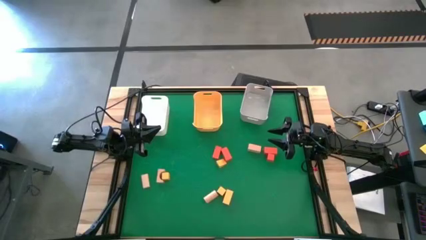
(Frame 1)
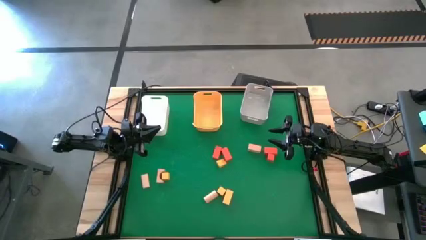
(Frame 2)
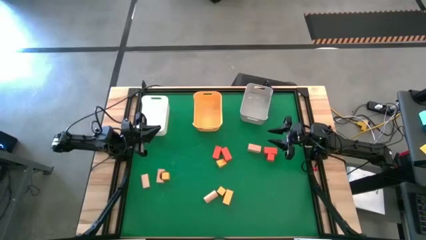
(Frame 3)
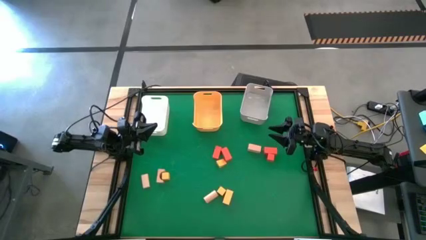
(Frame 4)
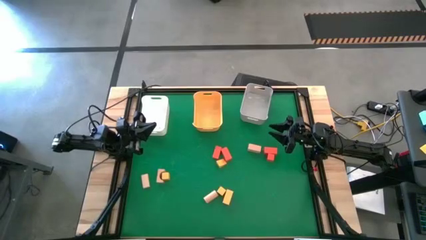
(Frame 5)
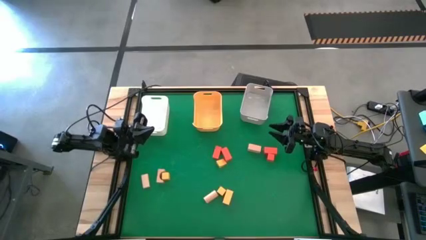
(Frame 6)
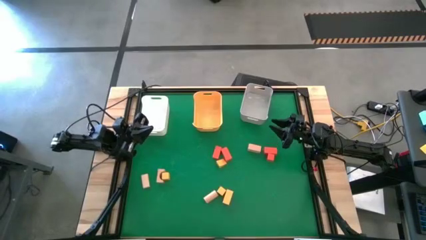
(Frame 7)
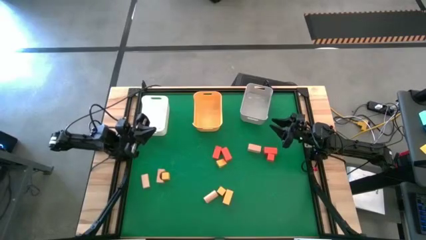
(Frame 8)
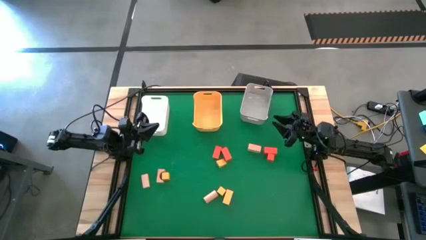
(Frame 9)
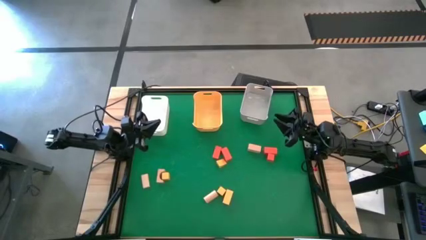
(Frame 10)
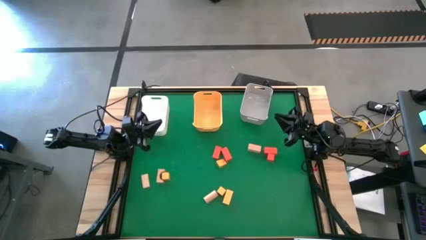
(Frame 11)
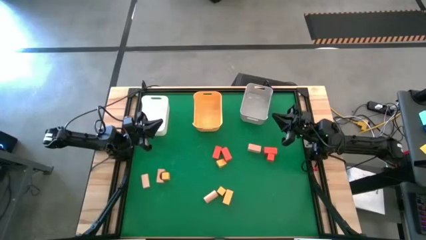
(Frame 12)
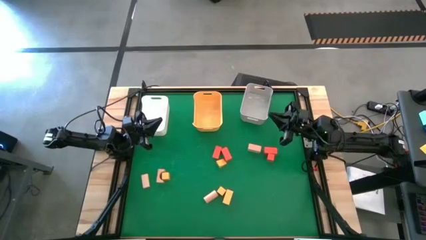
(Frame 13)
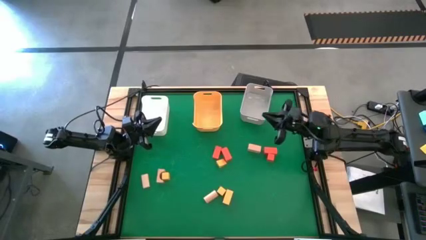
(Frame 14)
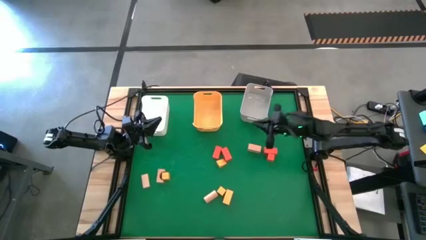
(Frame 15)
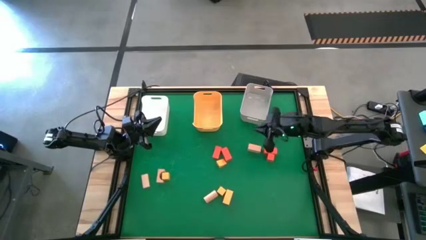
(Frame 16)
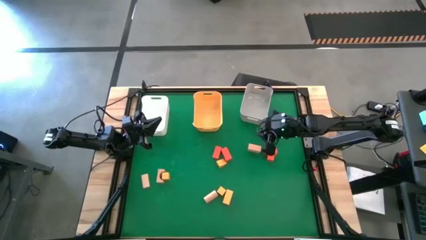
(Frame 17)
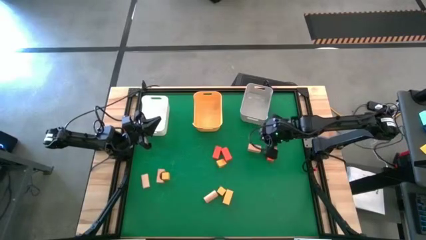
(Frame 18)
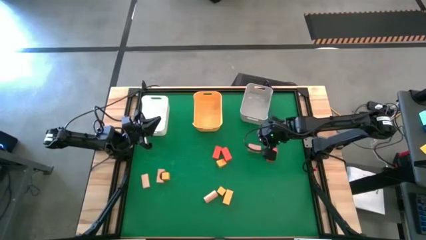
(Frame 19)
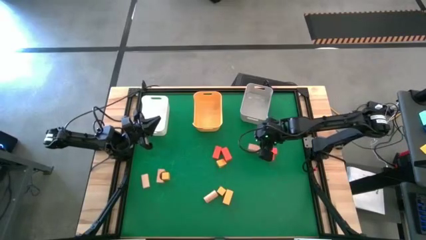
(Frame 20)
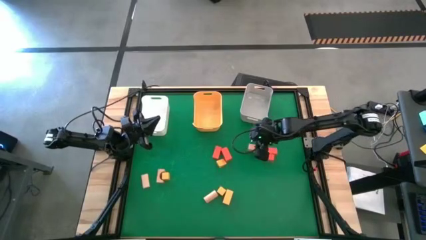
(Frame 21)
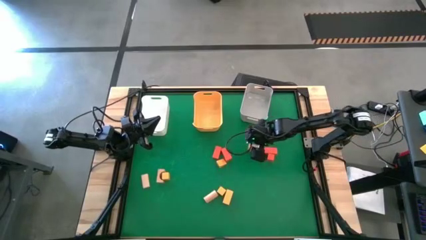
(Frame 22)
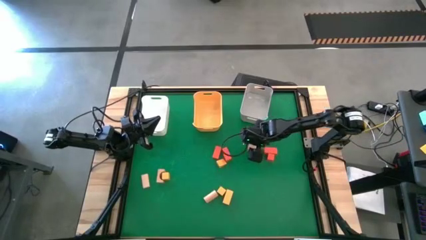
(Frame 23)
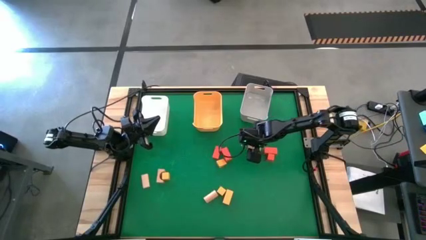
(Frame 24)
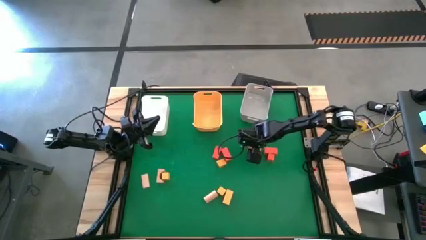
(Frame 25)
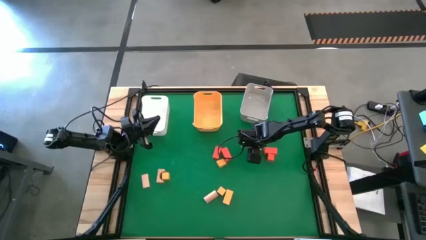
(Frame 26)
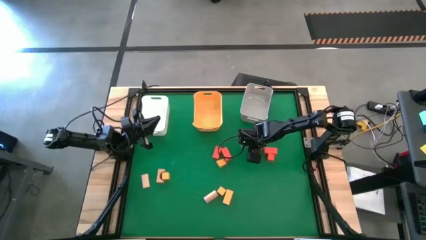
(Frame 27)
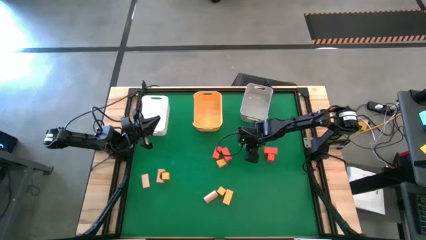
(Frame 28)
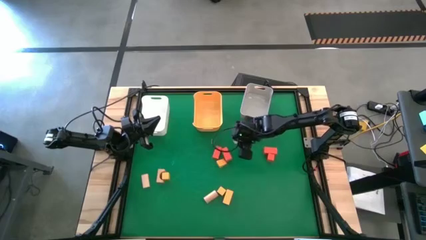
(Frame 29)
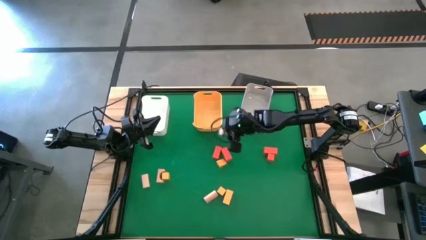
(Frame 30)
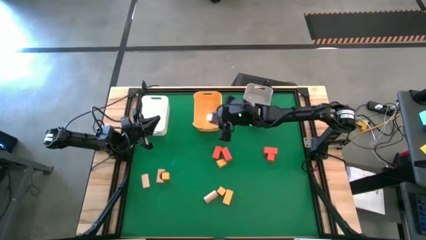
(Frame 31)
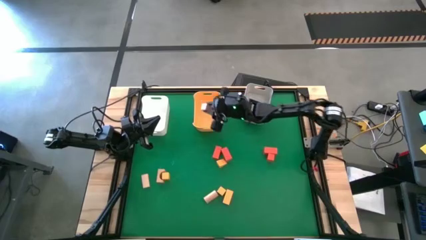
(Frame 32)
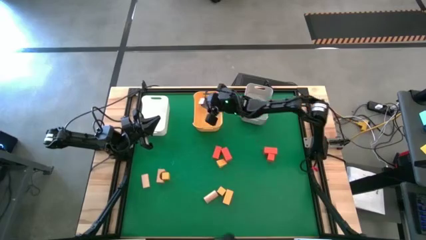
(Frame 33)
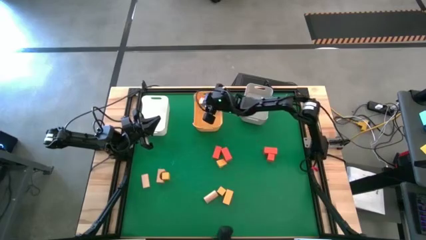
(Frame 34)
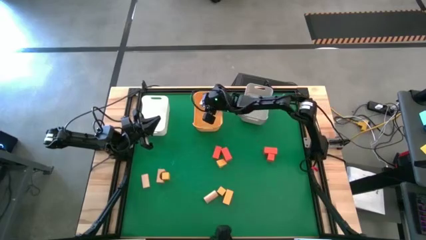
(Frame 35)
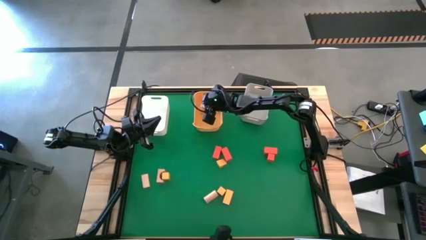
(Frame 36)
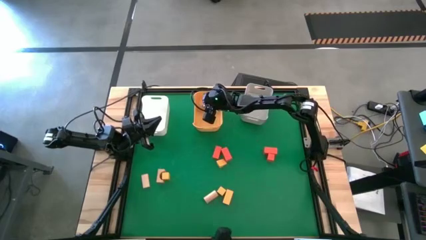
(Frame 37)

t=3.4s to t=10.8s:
Task: Sort & place blocks by color
Put the brown block into the yellow bin

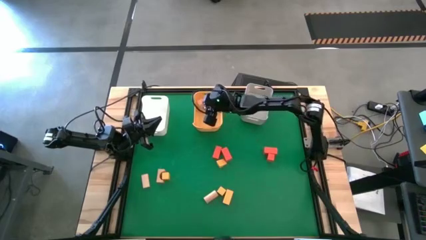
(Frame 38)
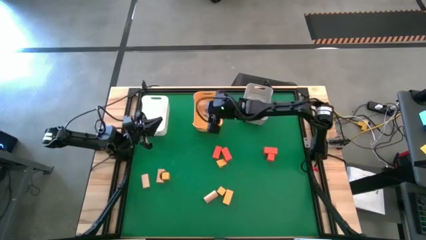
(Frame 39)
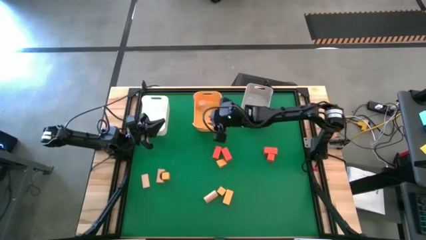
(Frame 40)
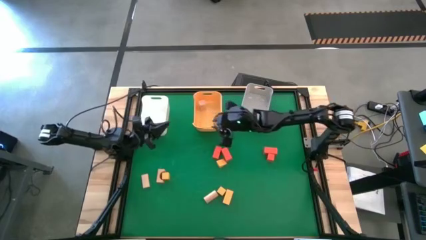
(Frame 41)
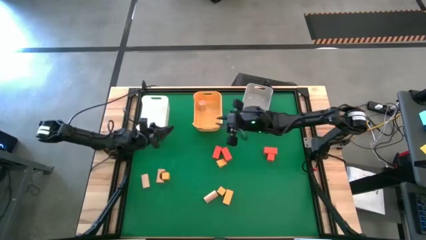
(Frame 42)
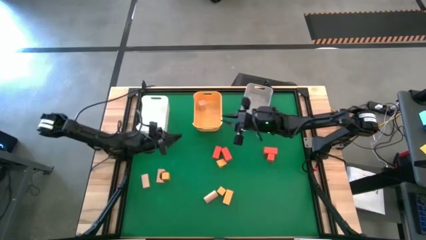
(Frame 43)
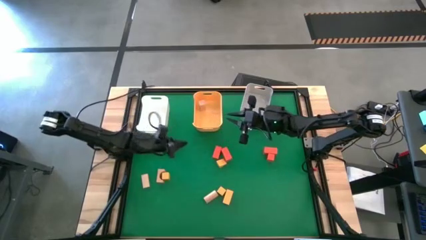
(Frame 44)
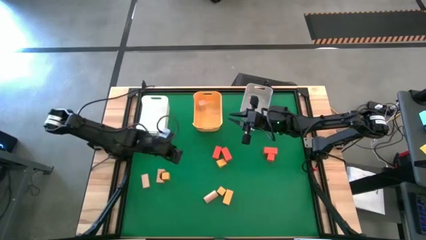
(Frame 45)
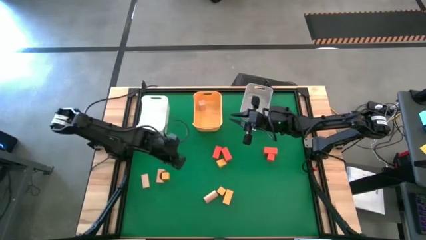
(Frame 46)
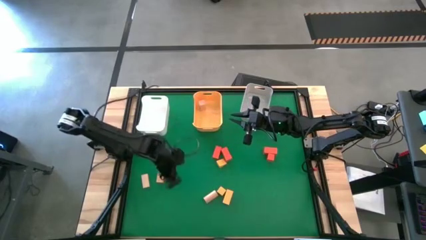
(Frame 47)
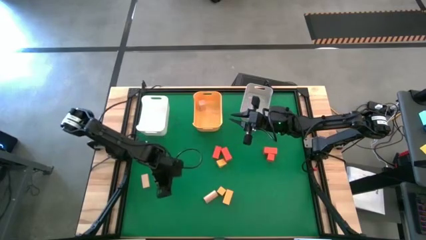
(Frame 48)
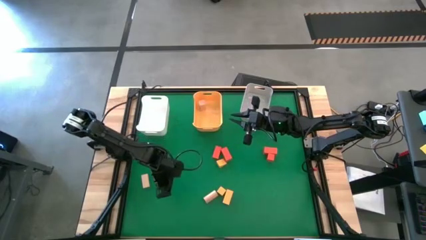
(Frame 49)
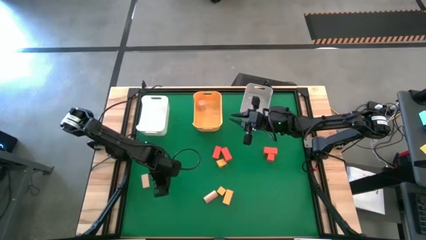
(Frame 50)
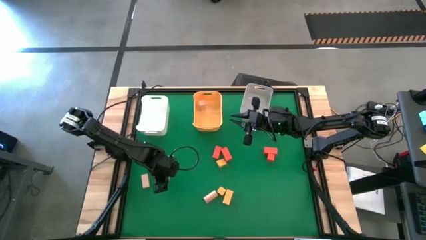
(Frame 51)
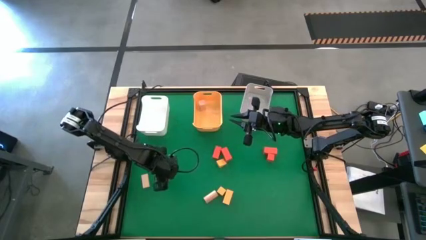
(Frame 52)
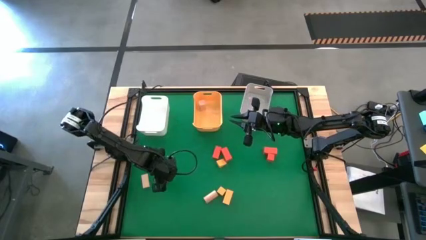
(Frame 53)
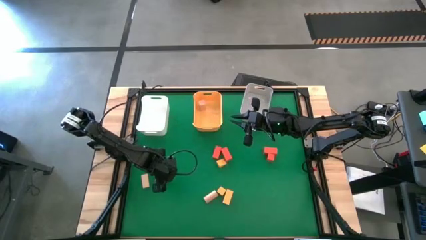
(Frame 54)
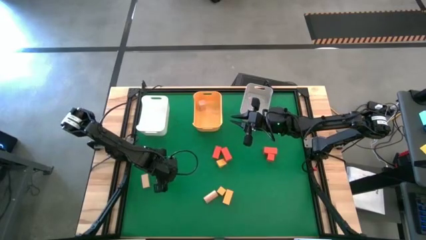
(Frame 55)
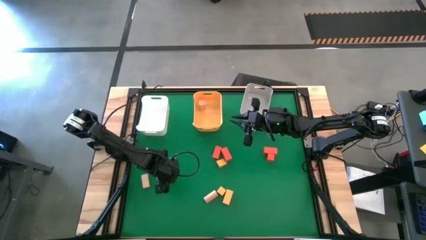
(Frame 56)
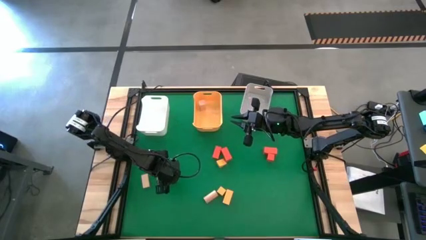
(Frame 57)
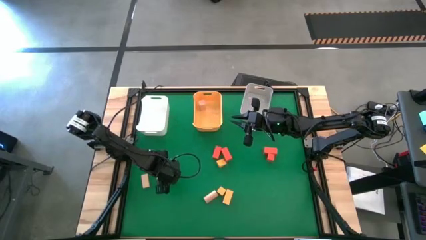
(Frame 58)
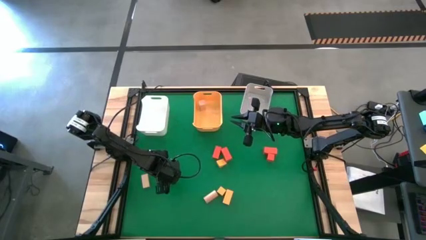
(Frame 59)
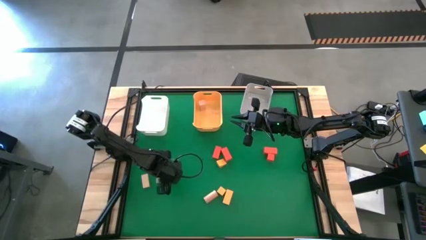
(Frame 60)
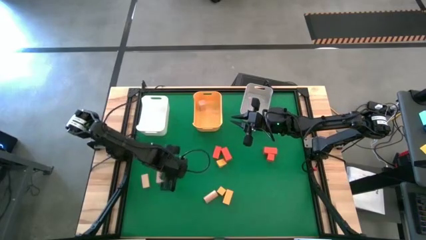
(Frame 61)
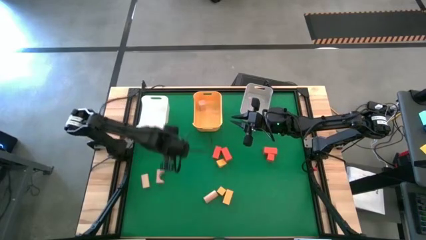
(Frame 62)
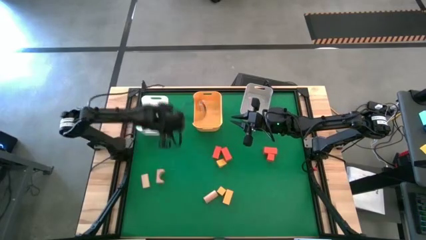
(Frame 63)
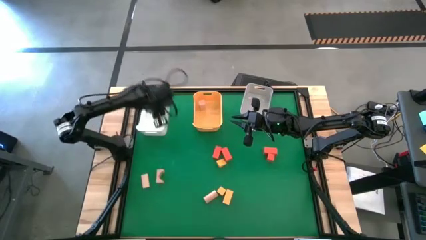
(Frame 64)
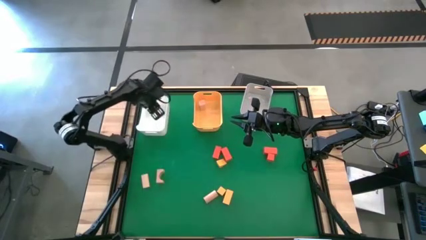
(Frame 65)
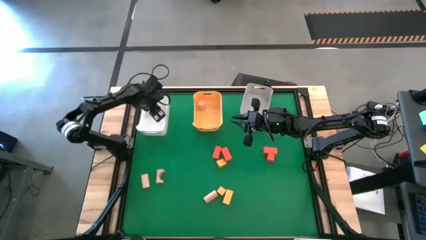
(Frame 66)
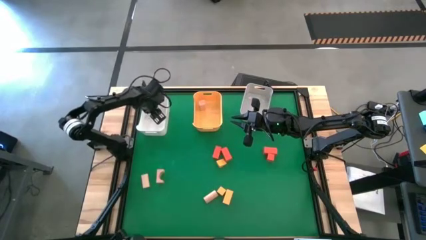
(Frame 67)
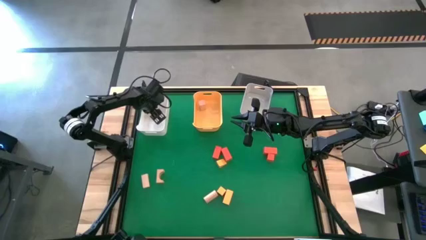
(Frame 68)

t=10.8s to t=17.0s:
Put the yellow block into the white bin
